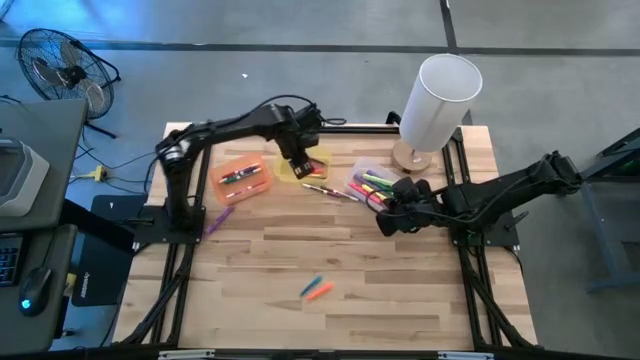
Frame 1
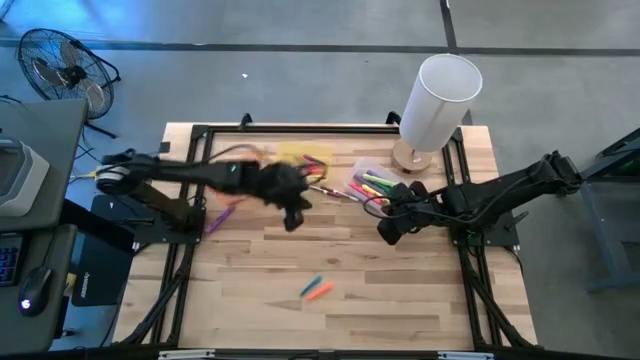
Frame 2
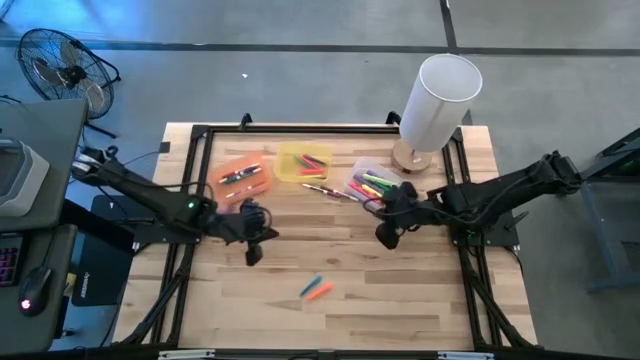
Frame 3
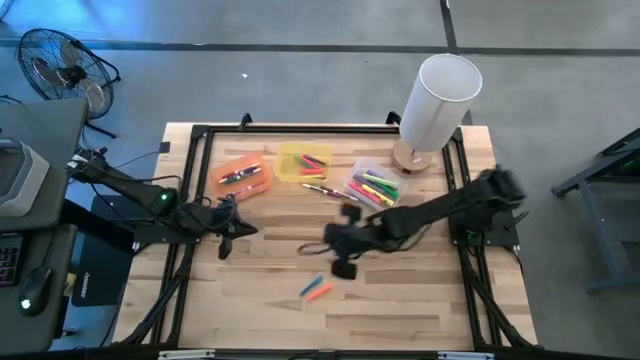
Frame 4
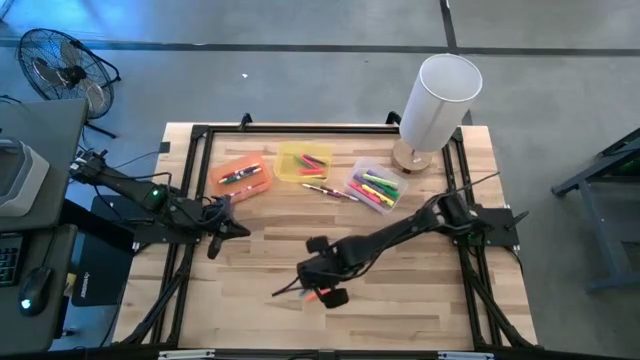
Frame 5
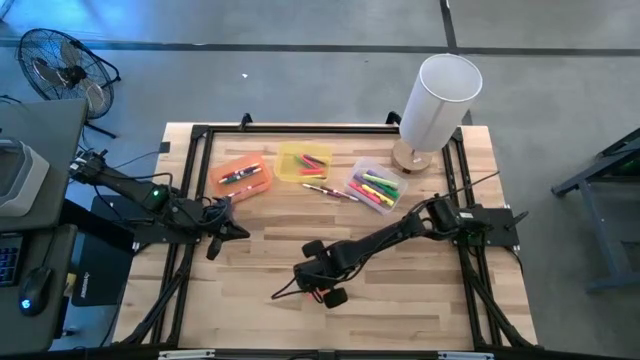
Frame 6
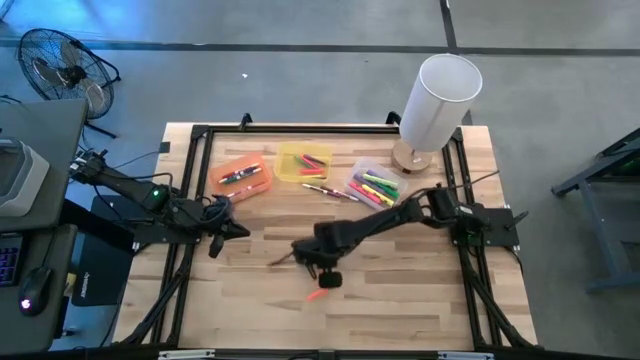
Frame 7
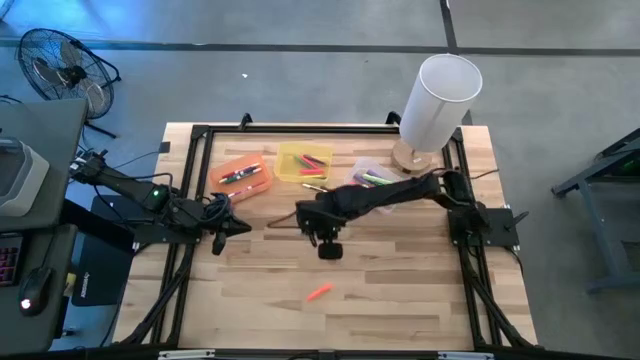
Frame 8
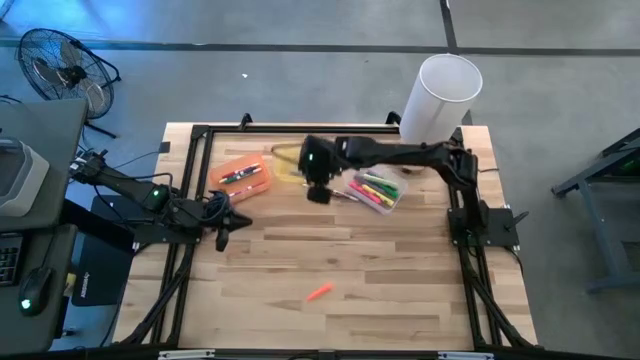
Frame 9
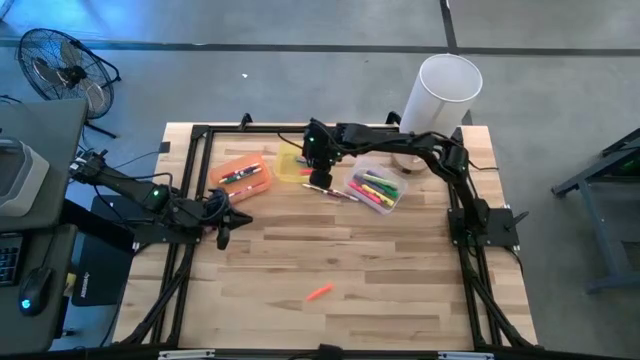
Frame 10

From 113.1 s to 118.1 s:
Task: Pick & Place Markers
Put the blue pen into the yellow bin

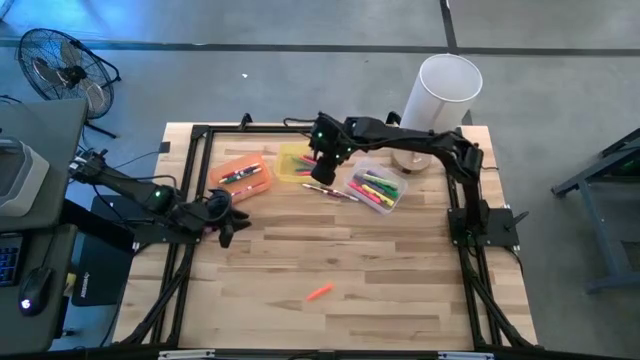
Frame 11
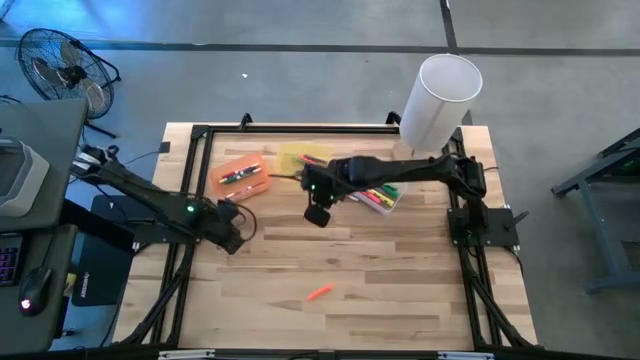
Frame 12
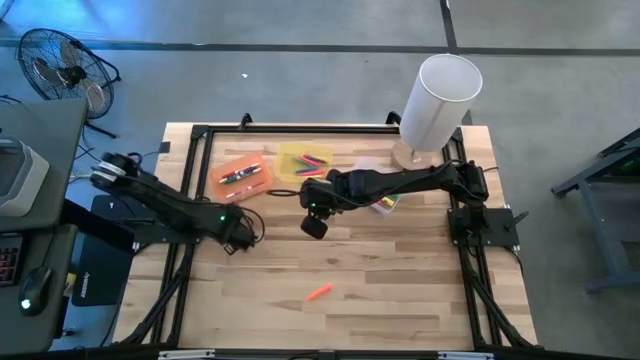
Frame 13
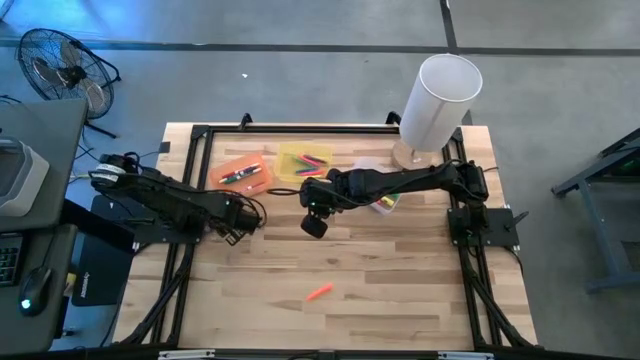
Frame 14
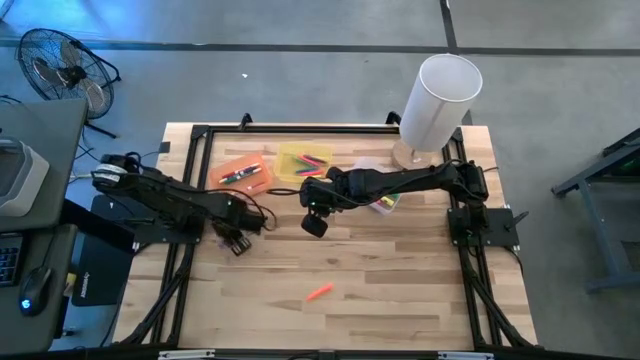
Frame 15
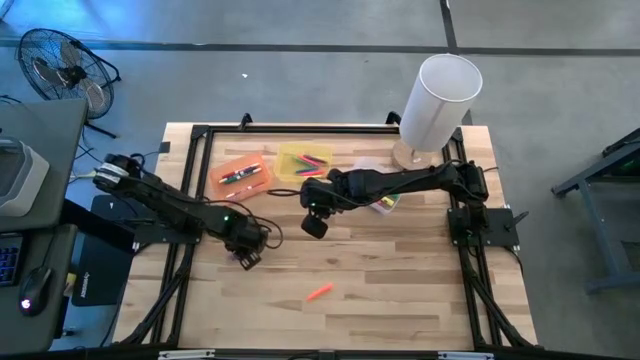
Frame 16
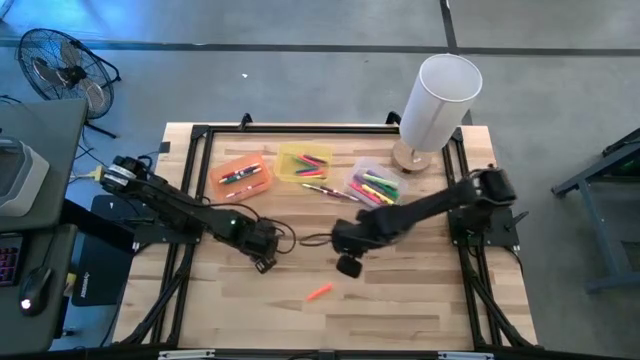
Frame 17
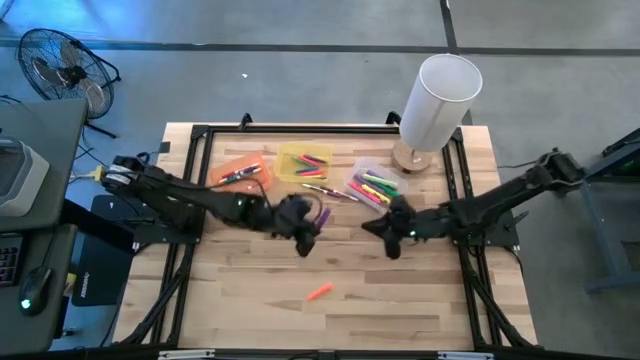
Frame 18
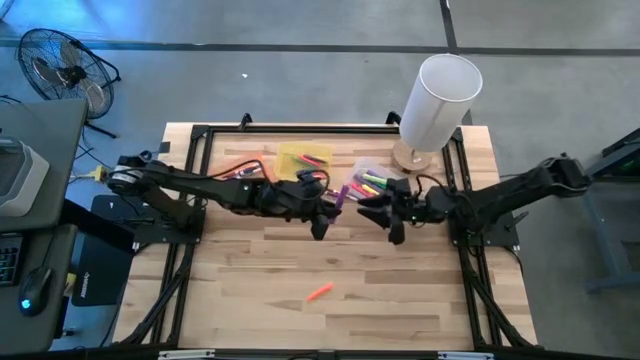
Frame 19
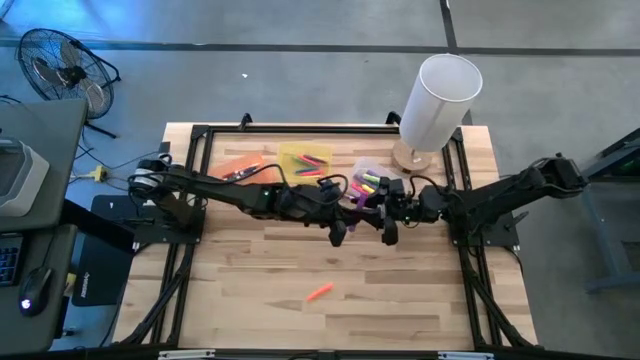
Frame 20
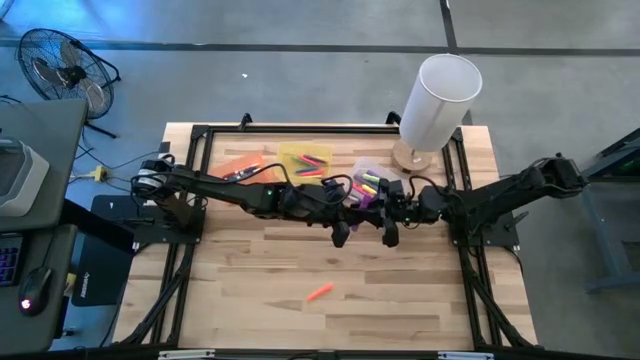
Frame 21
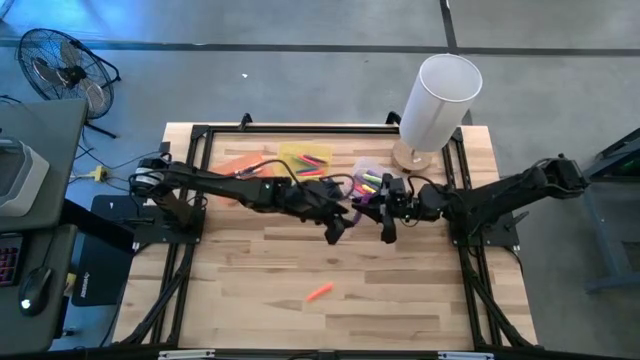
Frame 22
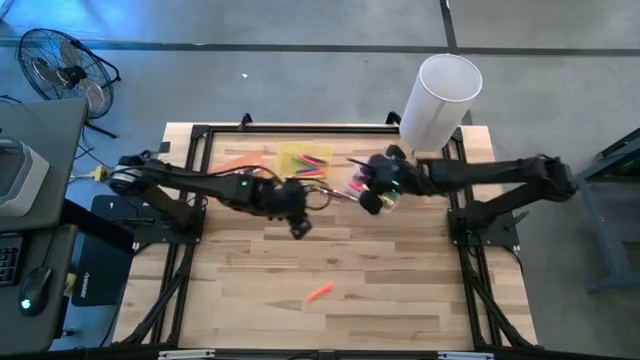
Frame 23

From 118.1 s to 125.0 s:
Put the violet highlighter pen into the white bin

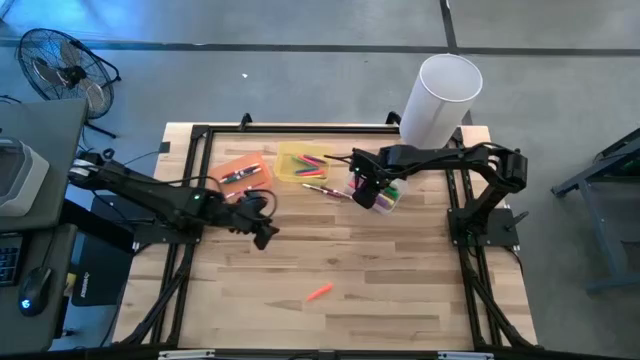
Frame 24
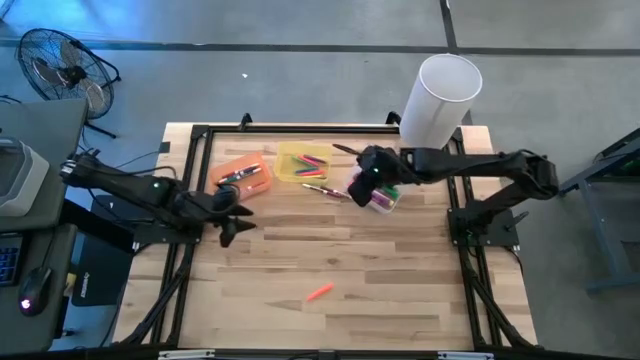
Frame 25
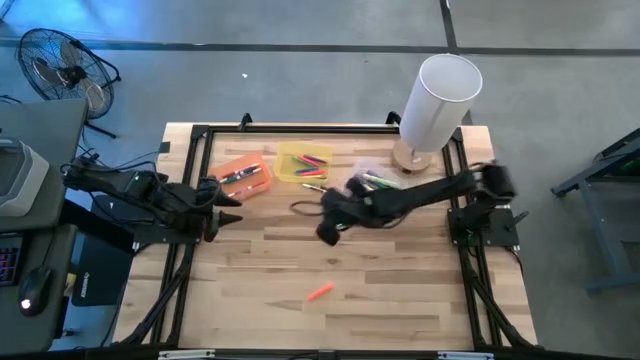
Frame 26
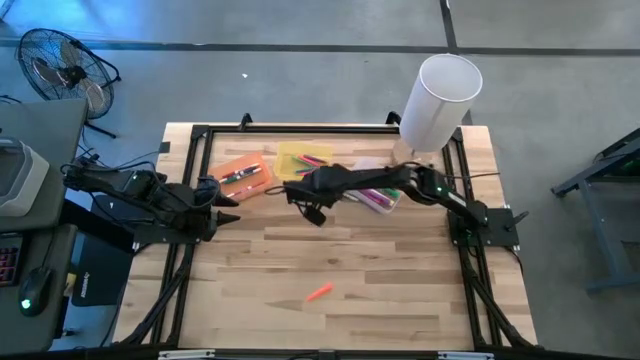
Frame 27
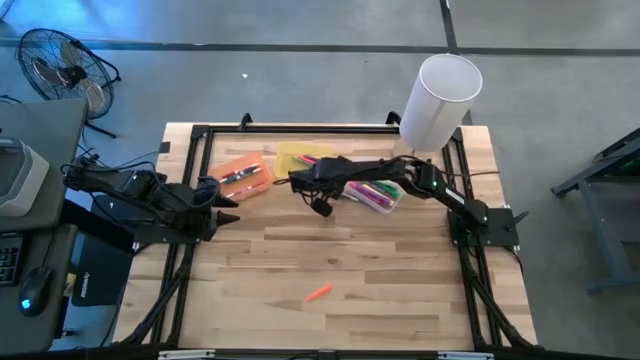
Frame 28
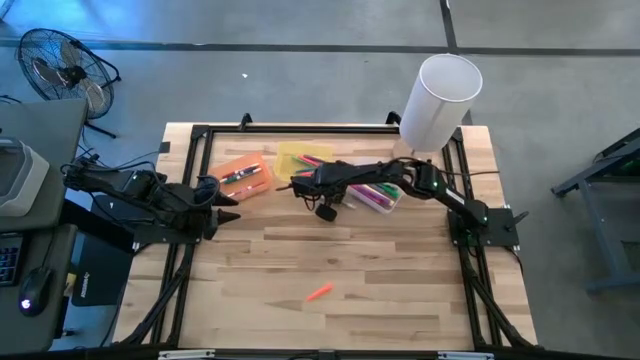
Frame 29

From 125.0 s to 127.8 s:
Adjust the marker pens on the table

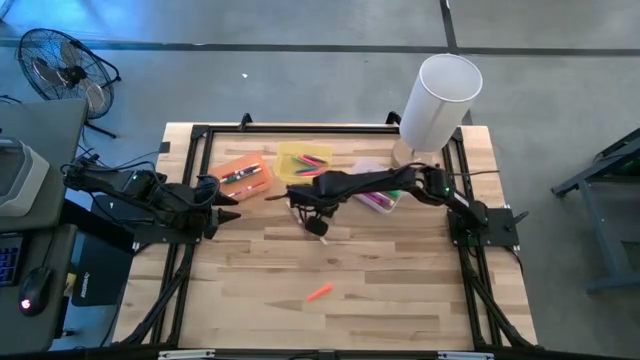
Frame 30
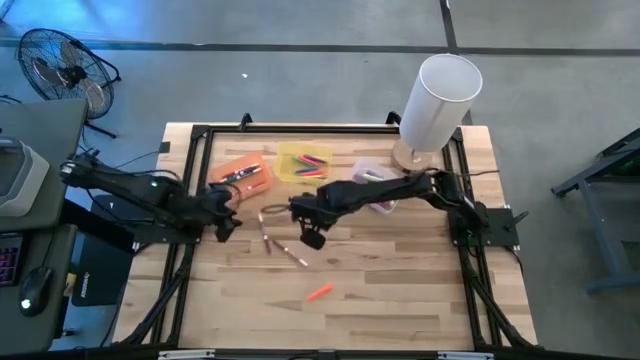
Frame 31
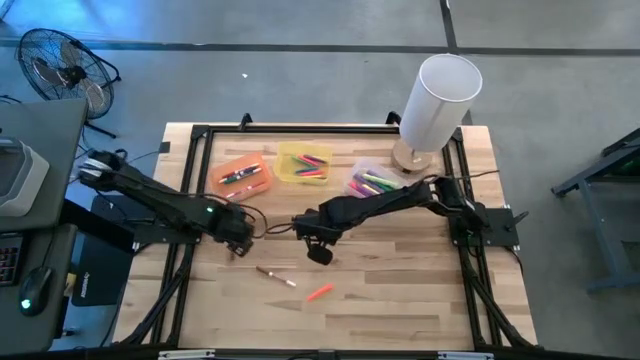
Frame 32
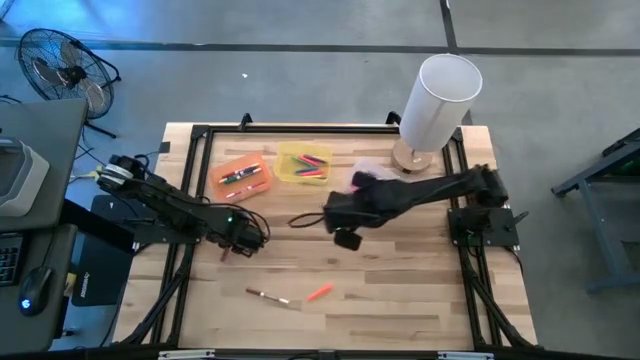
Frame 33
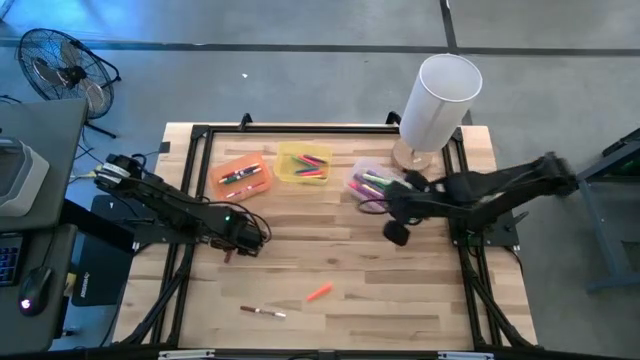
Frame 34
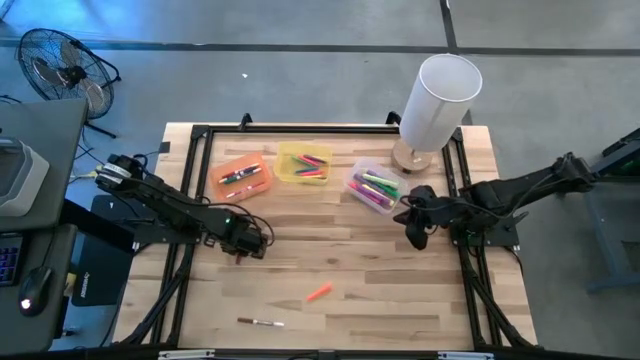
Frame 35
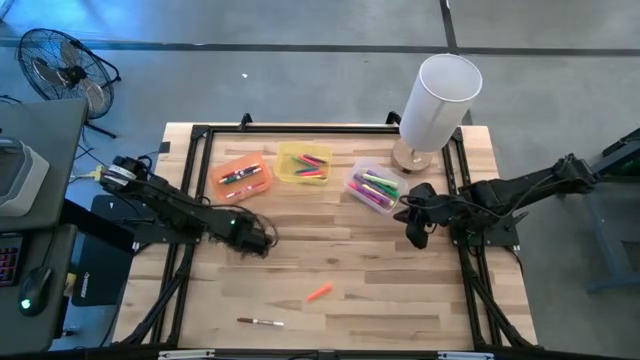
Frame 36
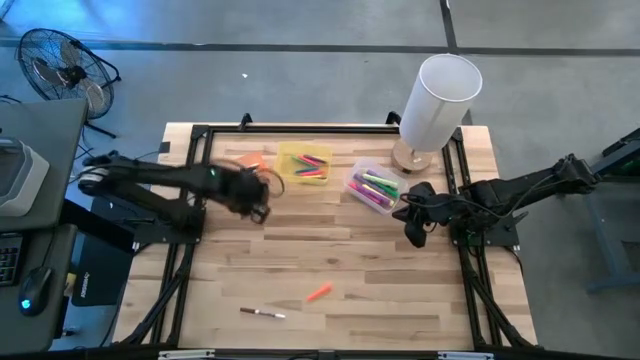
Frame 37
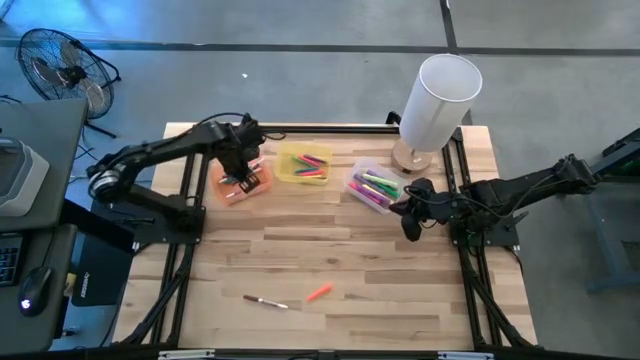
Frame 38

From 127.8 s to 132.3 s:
Put the dark red marker pen into the orange bin

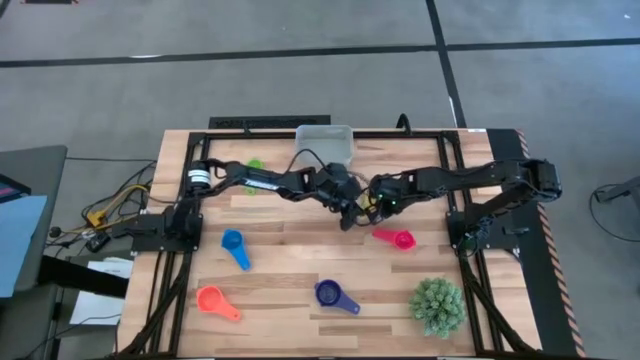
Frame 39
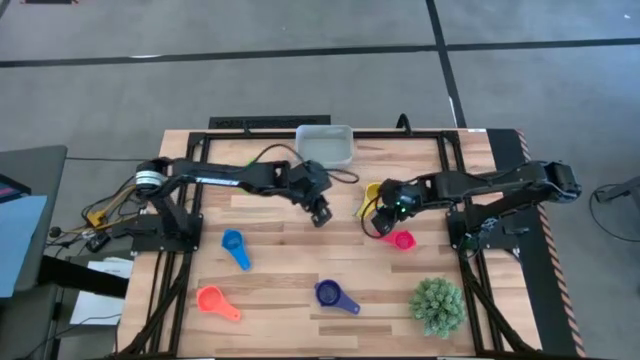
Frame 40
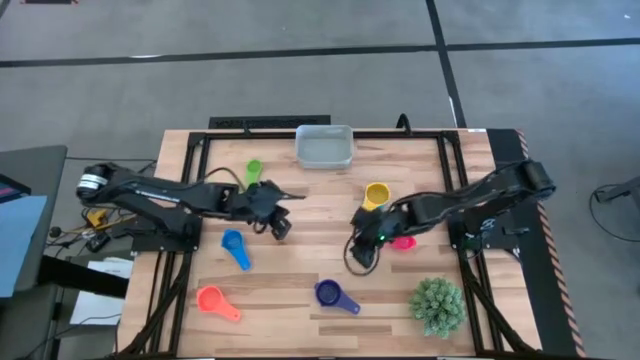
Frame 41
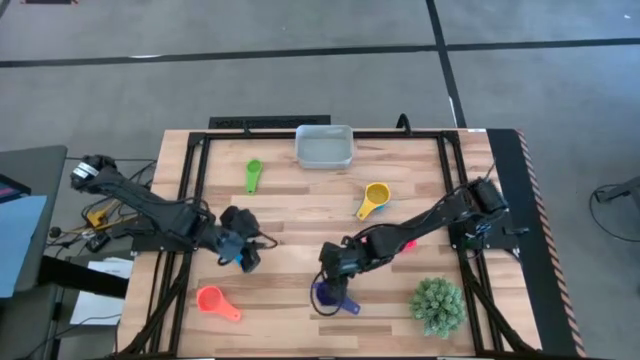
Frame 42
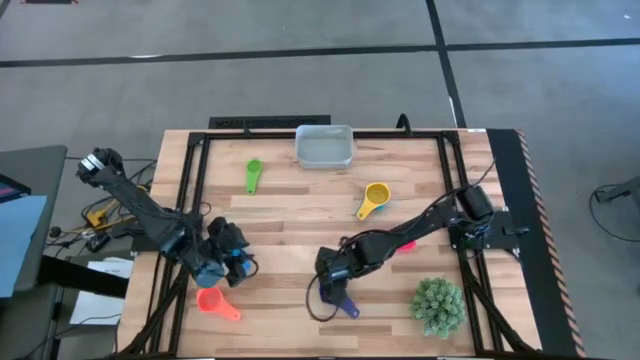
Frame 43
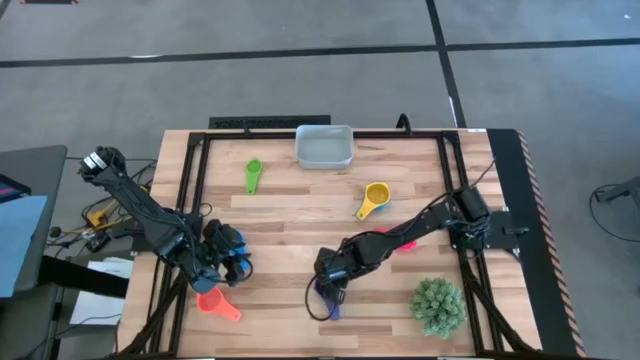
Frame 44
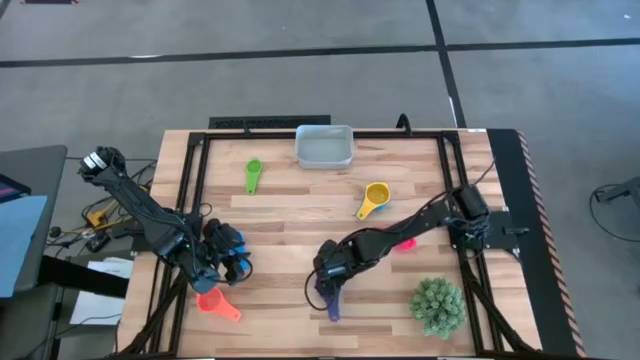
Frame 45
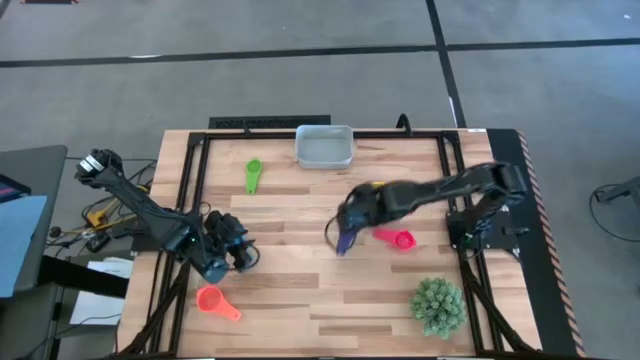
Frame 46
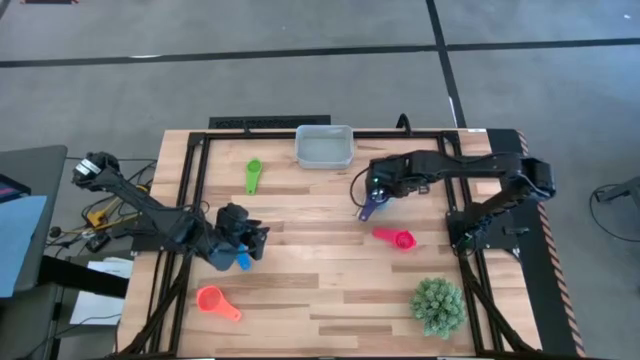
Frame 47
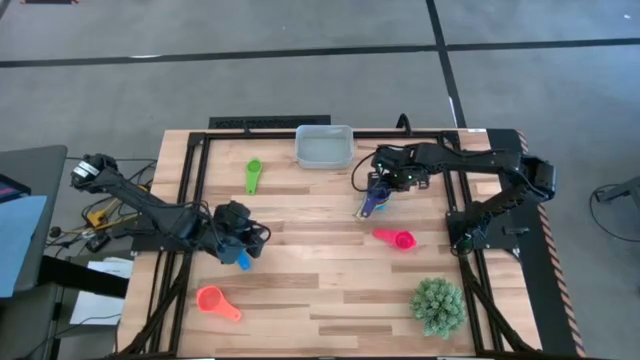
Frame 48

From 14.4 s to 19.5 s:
Task: Nest measuring cups in basket
Stack the purple measuring cup on top of the yellow measuring cup
